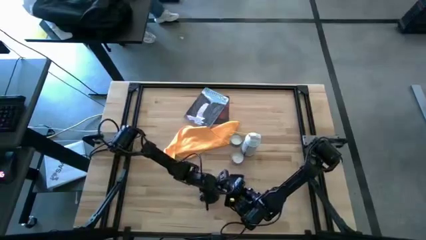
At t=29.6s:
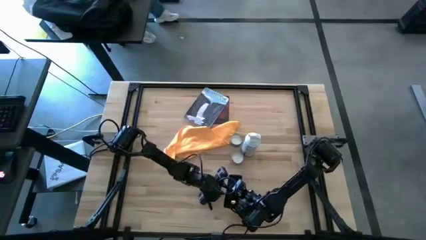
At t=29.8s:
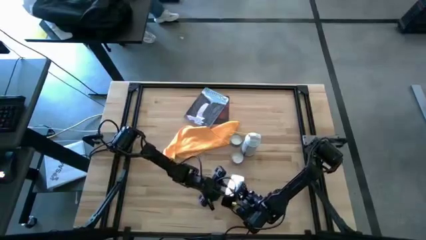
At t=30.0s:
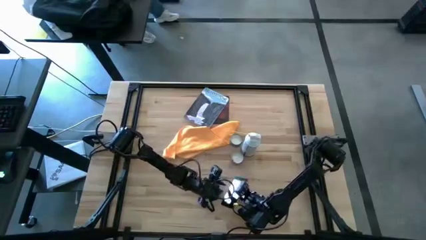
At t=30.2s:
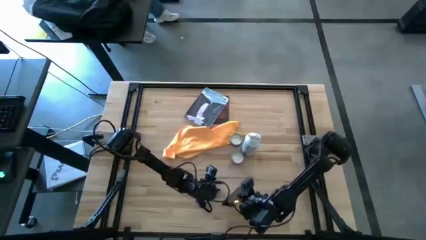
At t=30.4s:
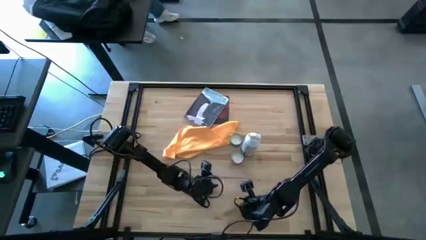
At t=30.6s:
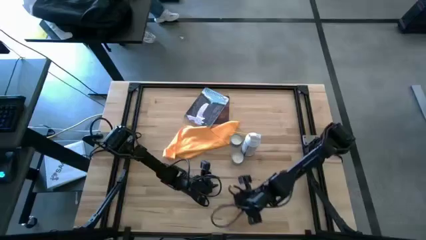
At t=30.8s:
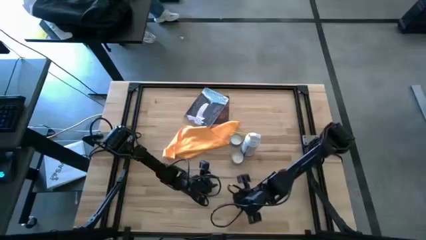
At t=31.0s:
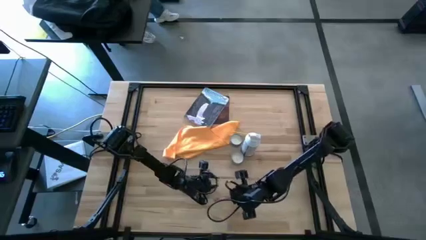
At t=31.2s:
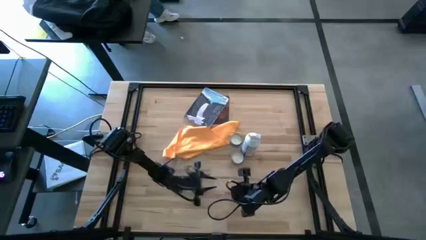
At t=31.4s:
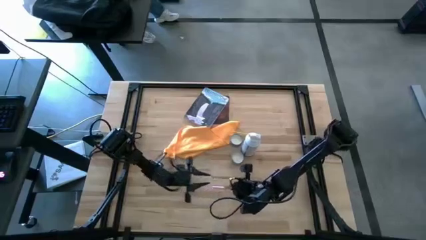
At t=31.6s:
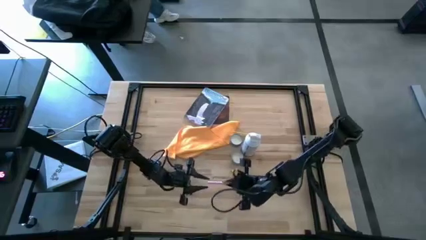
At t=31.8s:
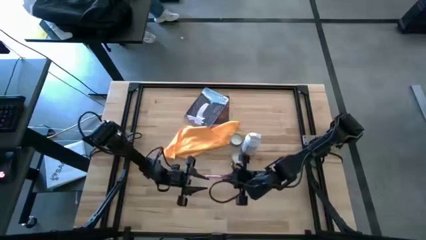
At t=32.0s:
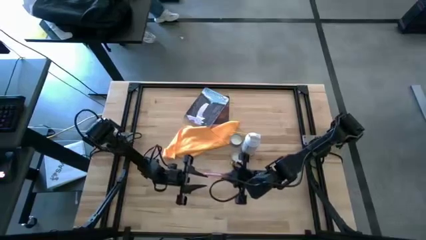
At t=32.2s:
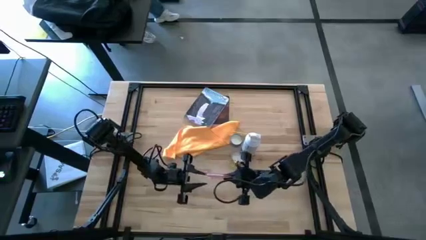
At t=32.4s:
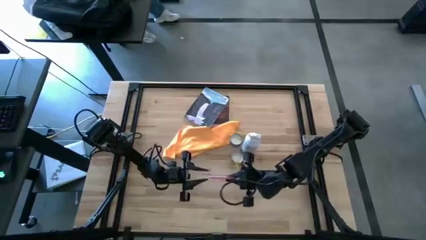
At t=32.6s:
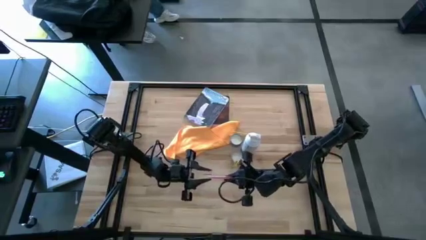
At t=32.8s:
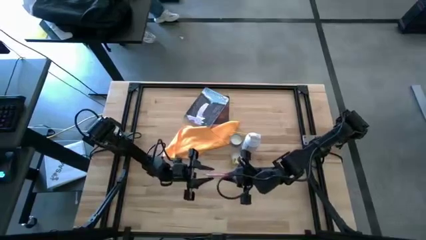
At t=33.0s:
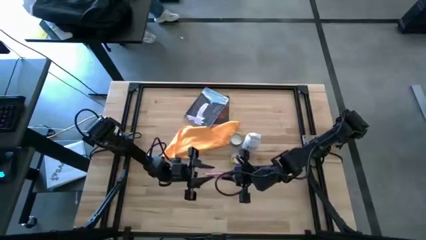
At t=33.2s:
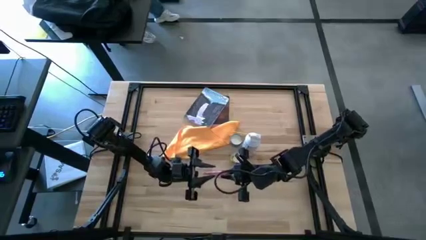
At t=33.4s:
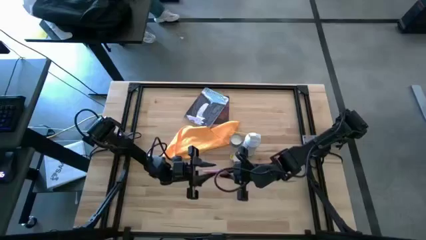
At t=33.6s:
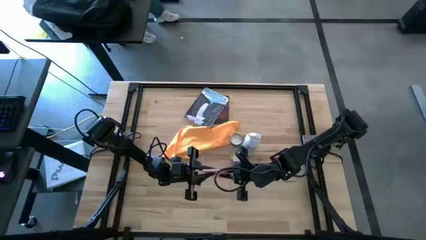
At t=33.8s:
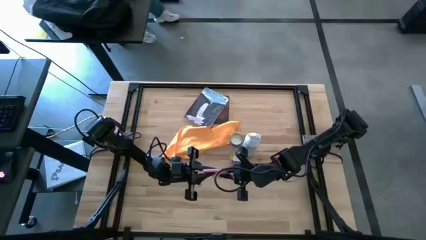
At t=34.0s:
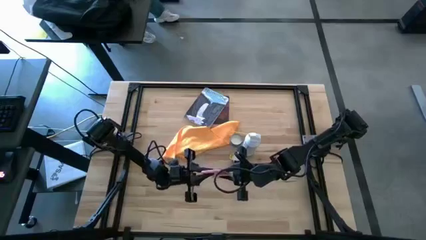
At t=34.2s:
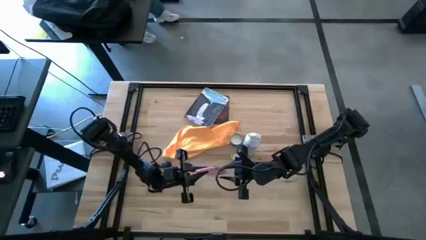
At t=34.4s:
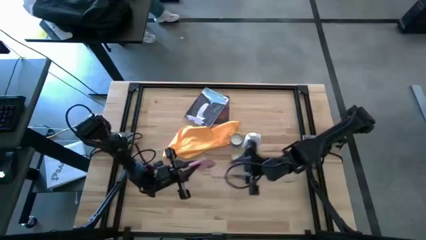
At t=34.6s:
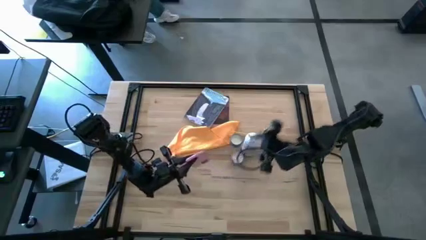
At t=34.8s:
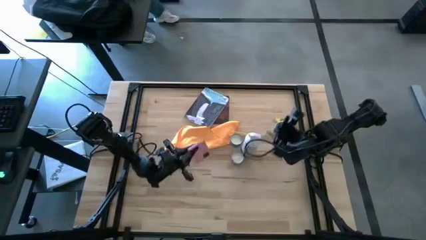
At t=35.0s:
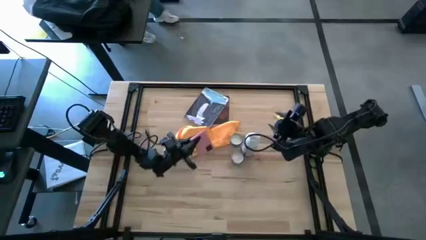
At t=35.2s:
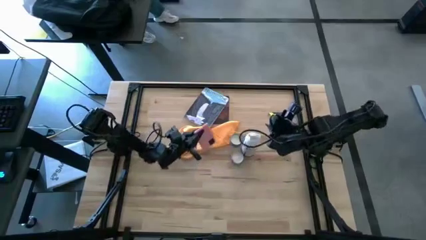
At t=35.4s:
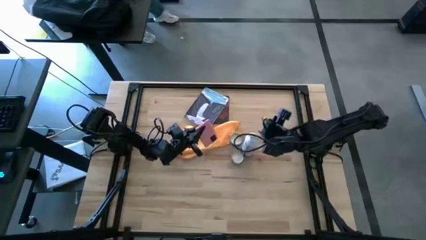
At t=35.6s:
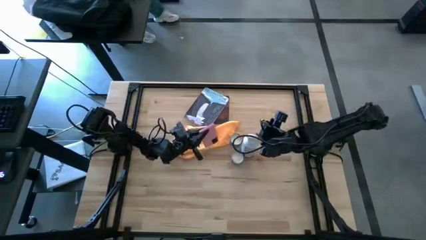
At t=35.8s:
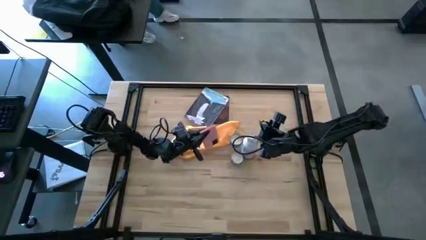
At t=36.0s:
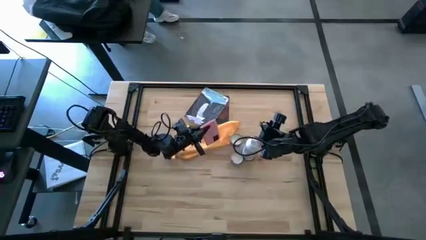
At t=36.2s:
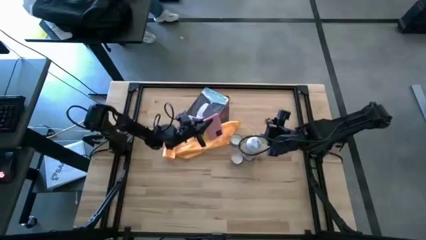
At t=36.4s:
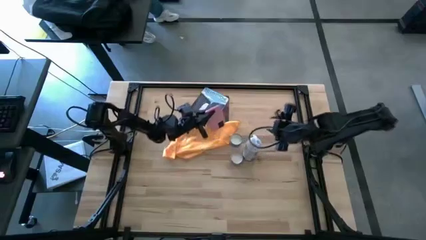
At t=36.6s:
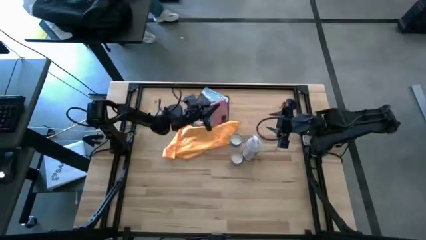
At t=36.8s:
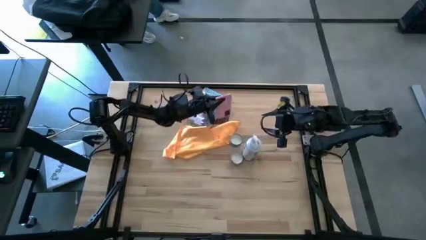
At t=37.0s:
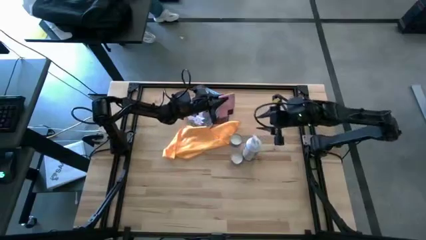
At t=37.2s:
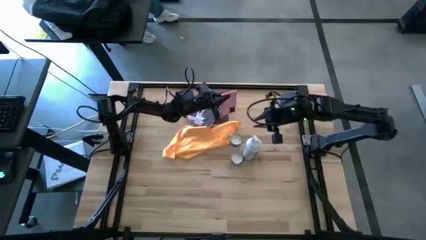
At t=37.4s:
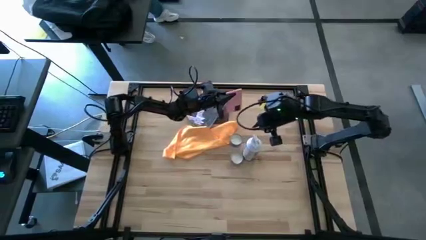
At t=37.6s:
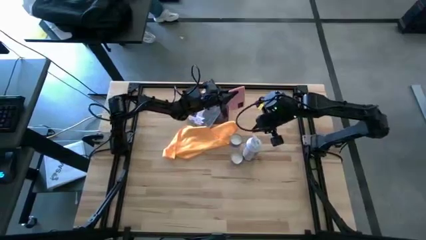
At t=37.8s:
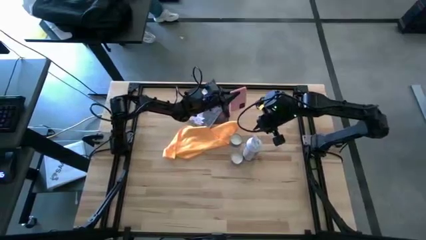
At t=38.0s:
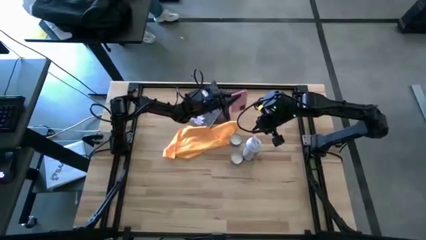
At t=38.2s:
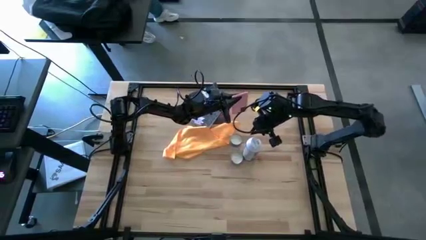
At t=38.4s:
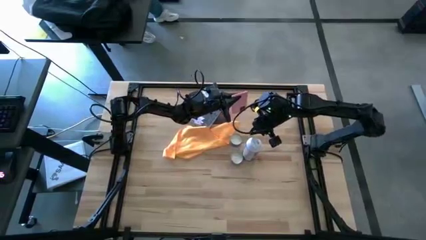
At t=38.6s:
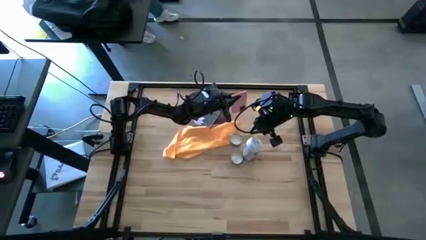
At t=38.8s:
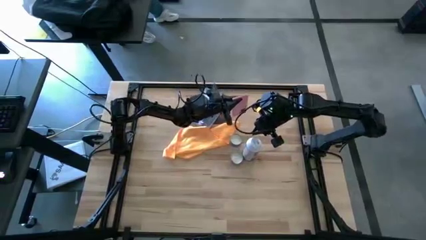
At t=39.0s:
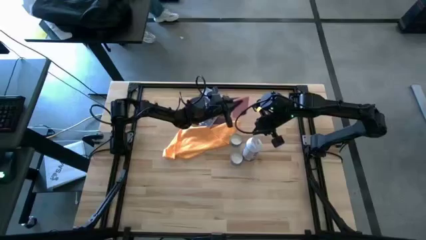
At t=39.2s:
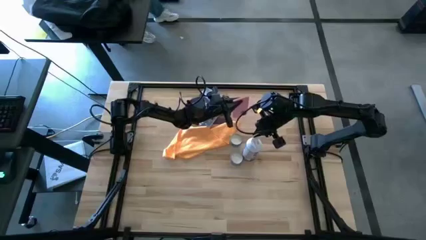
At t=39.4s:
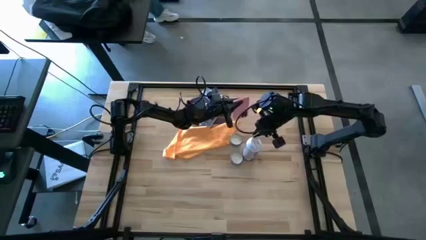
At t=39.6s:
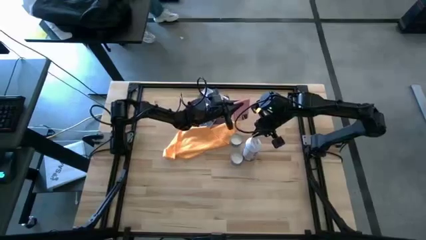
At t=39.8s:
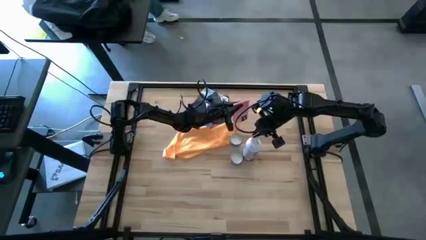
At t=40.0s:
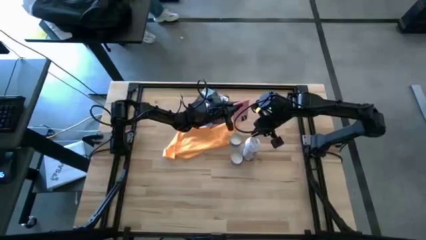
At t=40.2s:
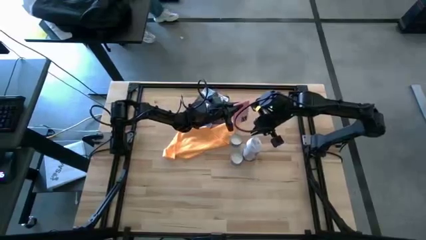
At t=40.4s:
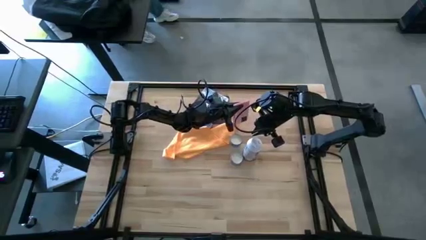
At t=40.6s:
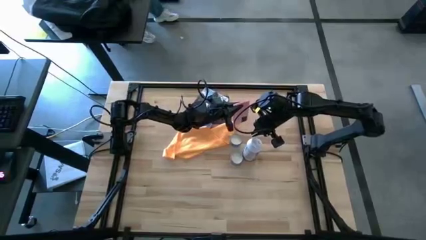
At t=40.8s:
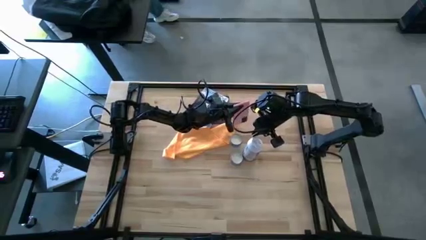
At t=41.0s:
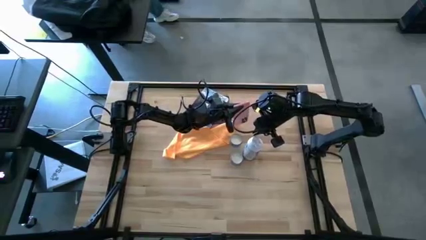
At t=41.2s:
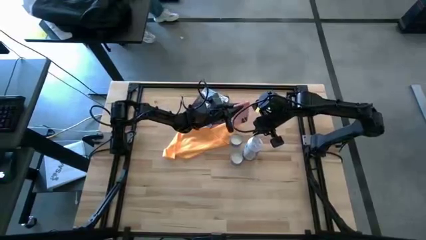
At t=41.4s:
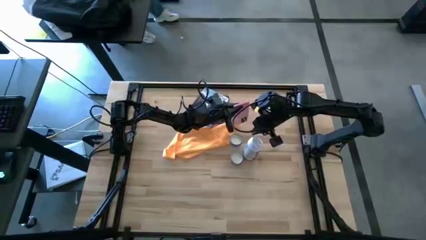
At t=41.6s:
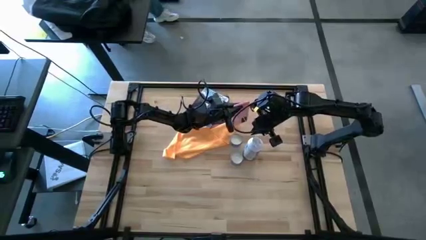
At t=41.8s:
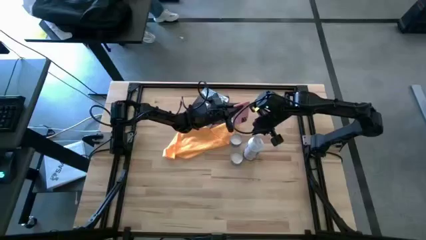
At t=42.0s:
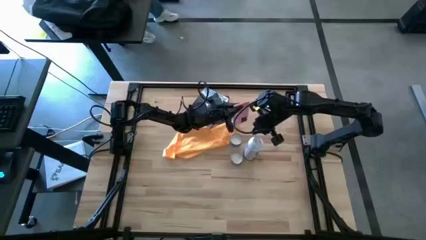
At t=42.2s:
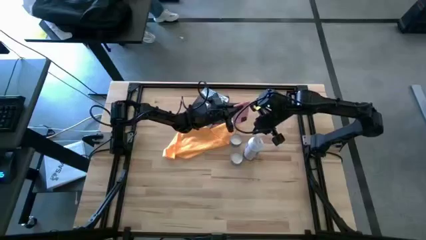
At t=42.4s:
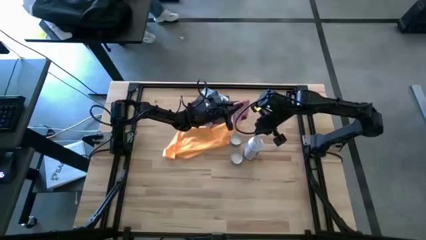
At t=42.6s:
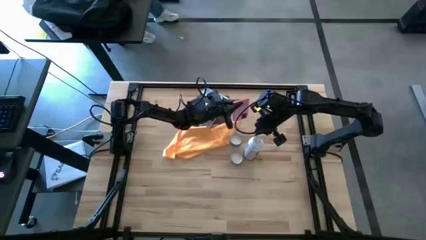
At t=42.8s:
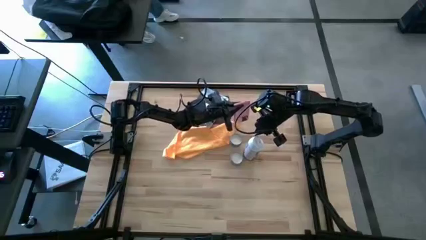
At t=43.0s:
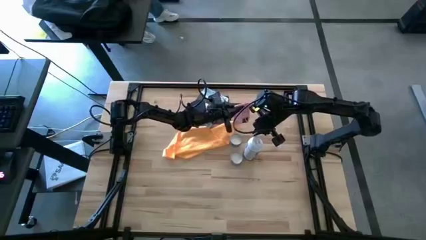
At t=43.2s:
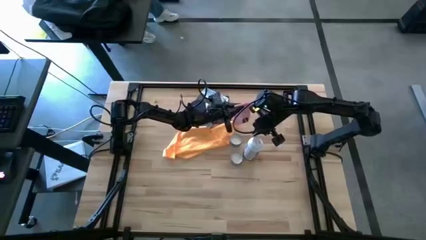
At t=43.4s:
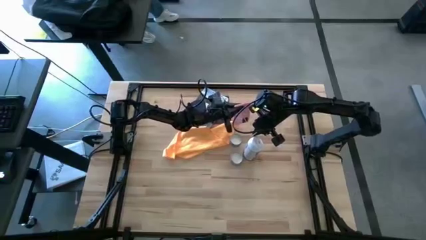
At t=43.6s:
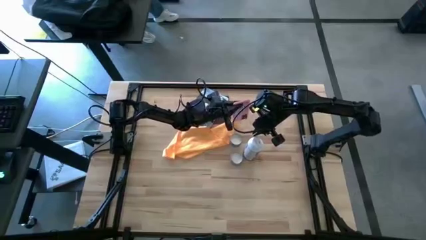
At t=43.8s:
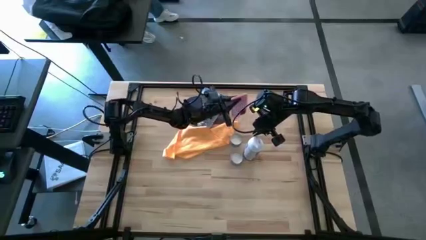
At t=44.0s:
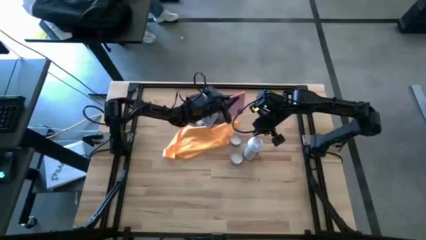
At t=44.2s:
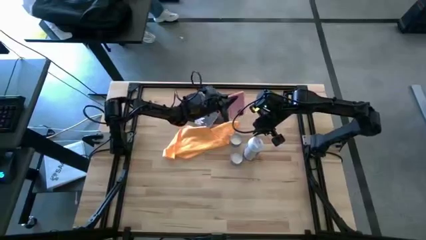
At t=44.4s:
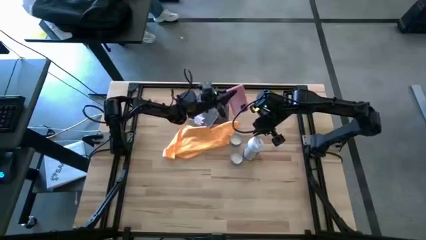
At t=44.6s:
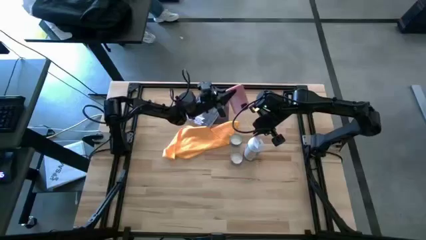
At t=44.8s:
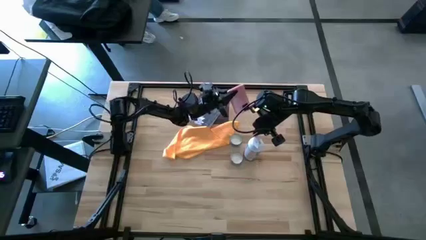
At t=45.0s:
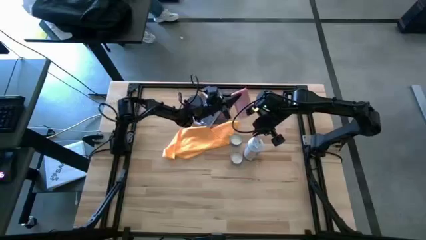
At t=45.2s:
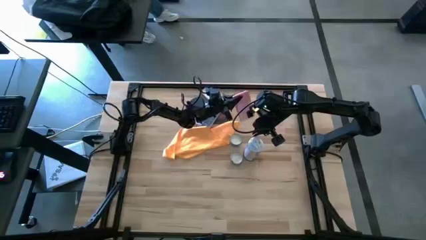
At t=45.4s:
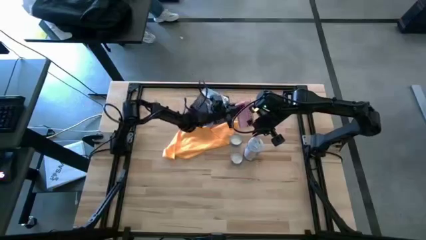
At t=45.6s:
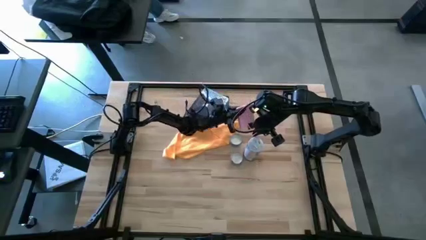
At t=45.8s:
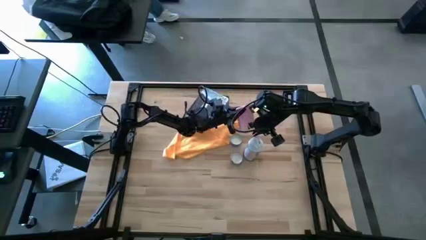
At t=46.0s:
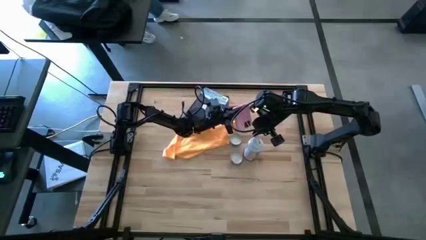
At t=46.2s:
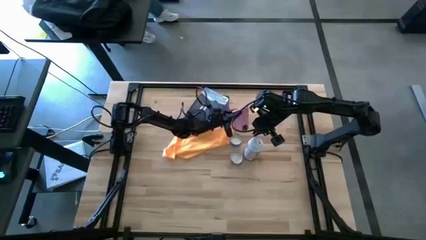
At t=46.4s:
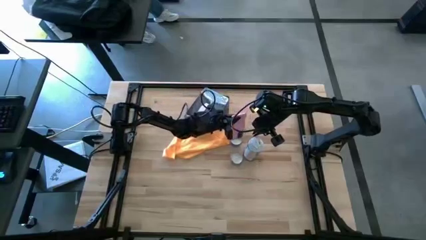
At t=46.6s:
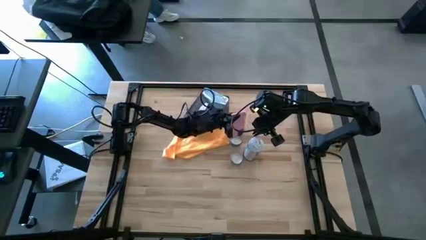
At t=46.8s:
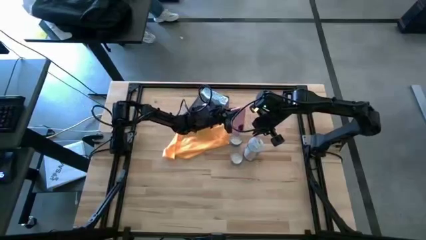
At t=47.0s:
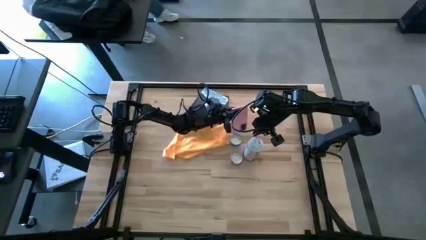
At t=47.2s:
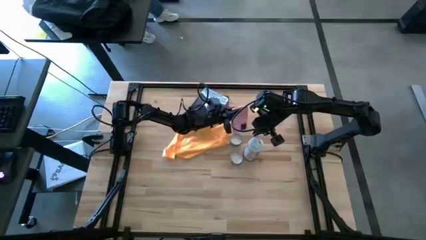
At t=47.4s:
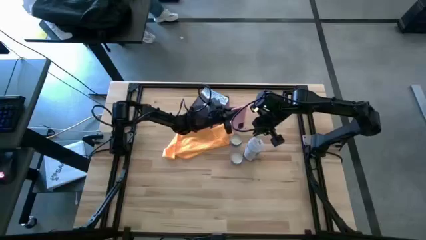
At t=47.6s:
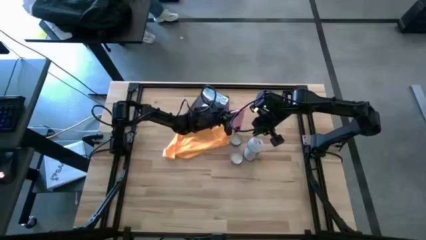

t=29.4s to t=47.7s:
Task: Apply microfiber cloth
Spray the pink phone using the white spray bottle
